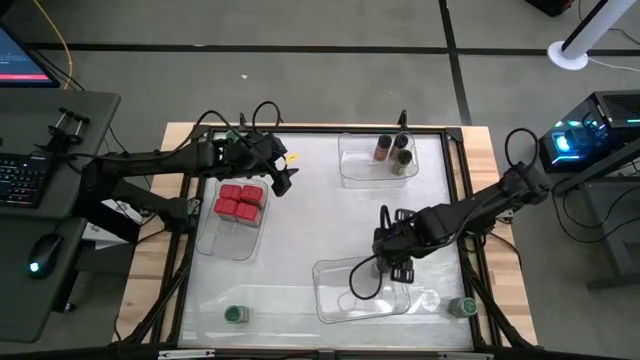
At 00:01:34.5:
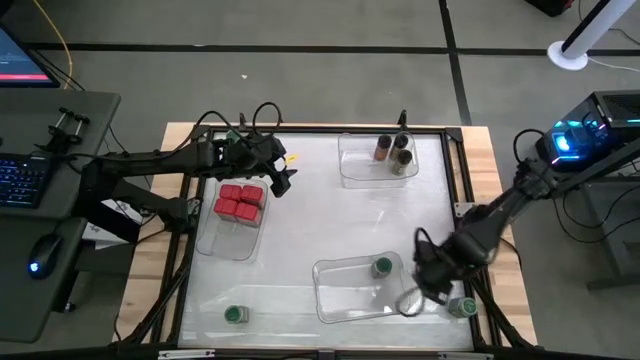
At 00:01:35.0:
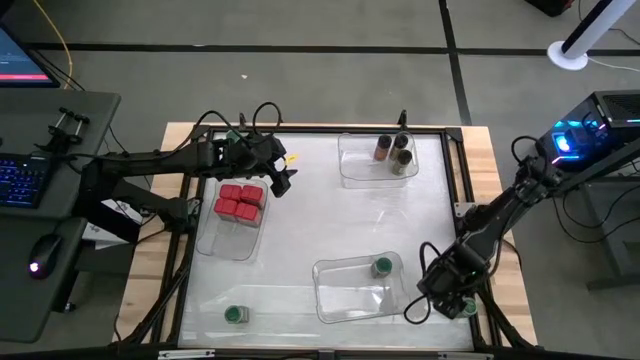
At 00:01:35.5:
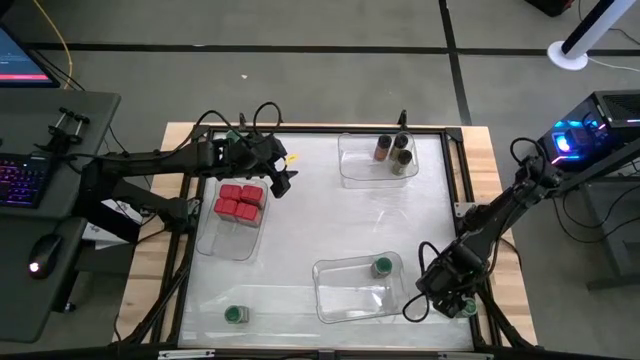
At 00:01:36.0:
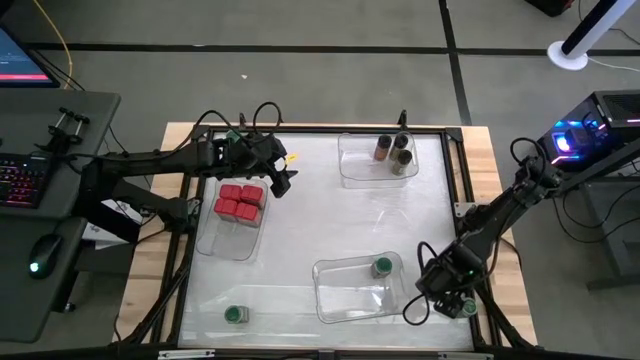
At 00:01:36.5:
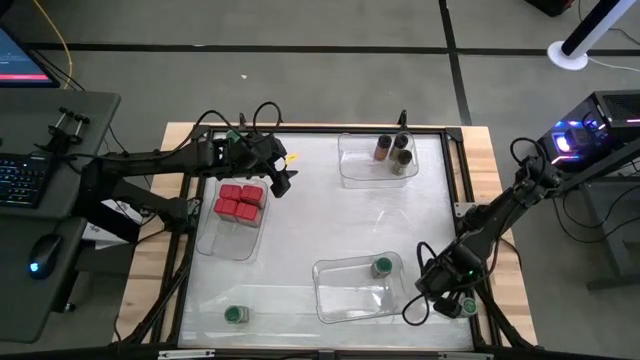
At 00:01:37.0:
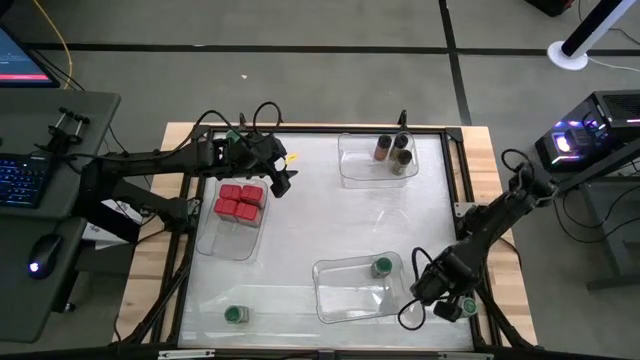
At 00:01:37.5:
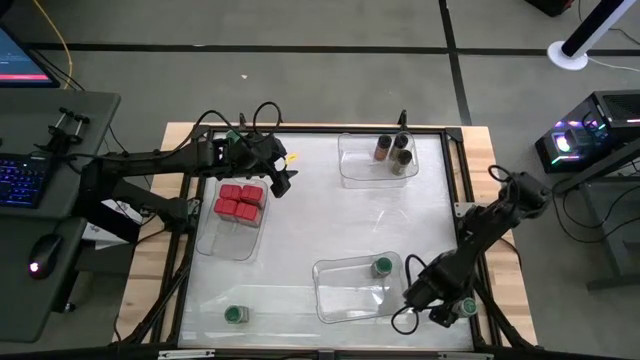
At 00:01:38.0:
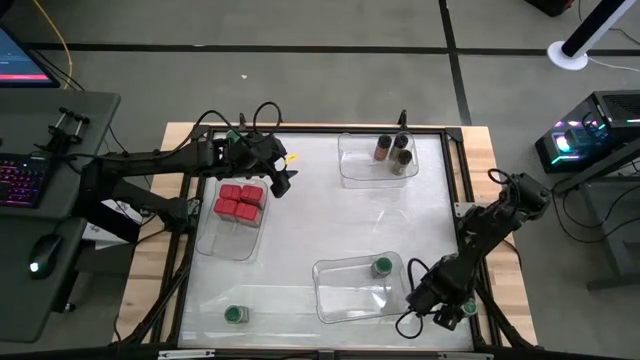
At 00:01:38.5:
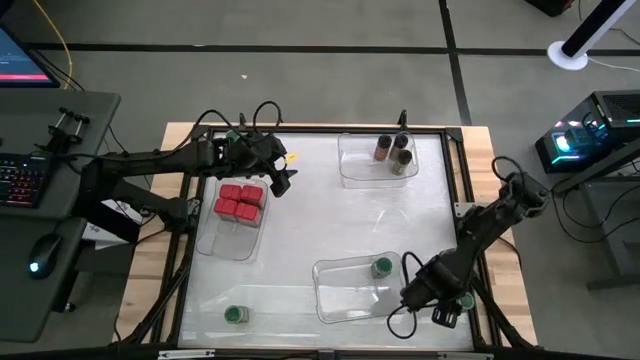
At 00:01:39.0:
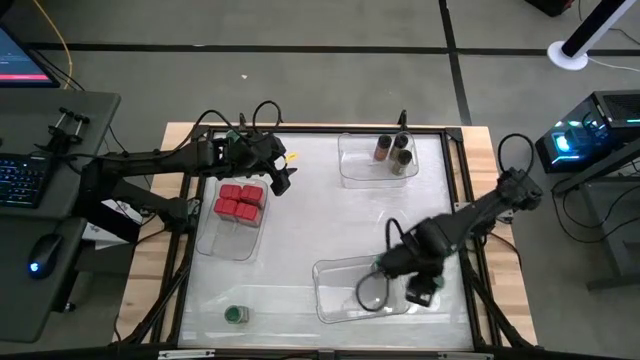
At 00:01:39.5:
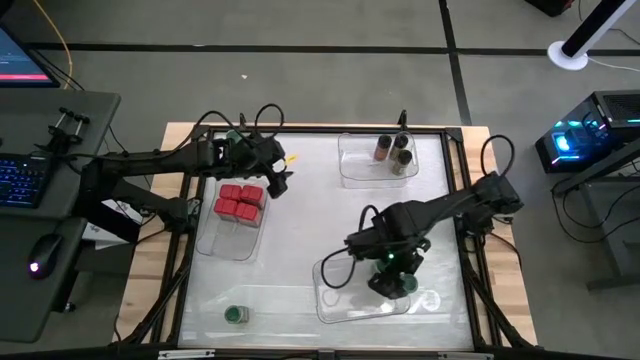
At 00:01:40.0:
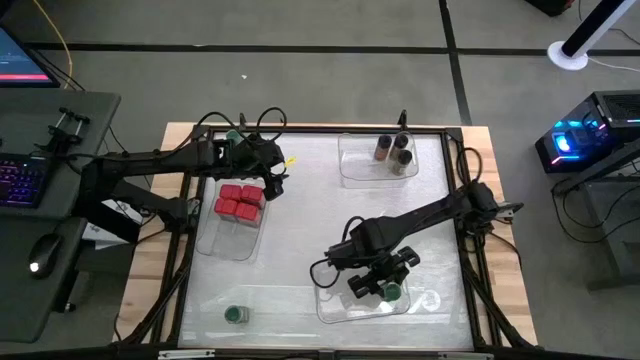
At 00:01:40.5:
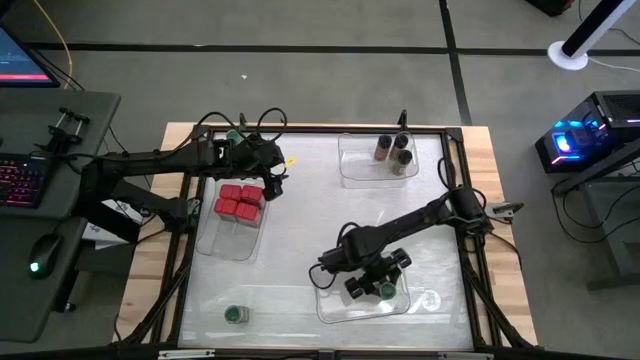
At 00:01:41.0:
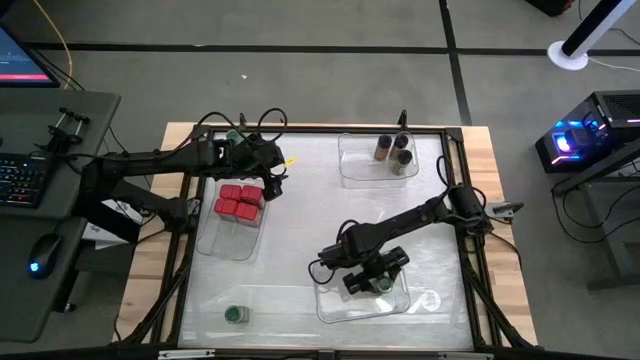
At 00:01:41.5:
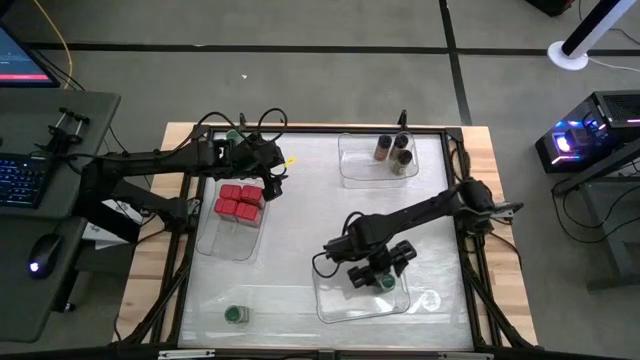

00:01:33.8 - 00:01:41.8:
Task: Sort spices by type
Put the green seasoning bottle into the bottom right transparent bin

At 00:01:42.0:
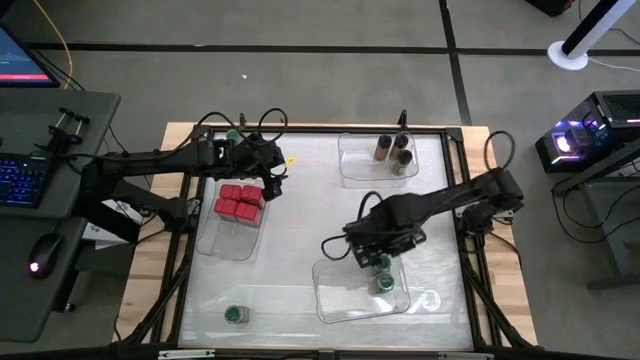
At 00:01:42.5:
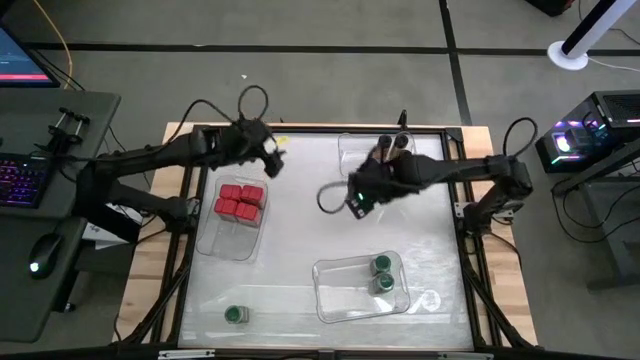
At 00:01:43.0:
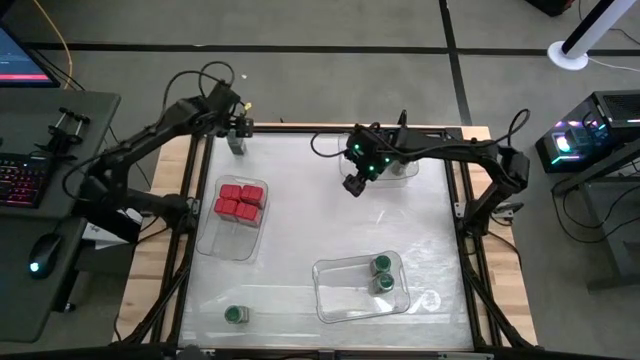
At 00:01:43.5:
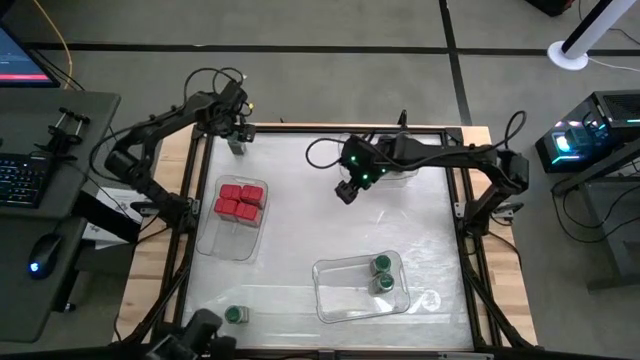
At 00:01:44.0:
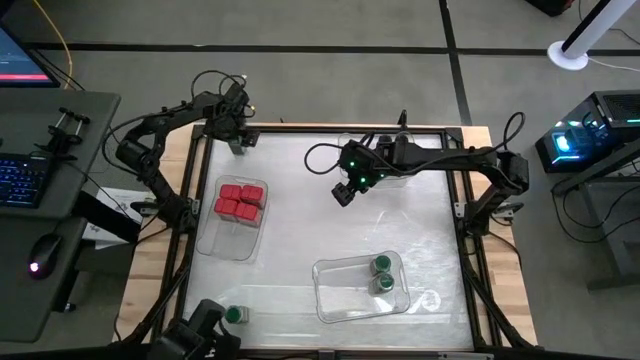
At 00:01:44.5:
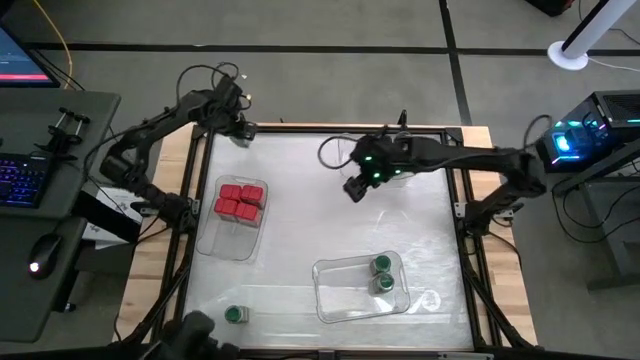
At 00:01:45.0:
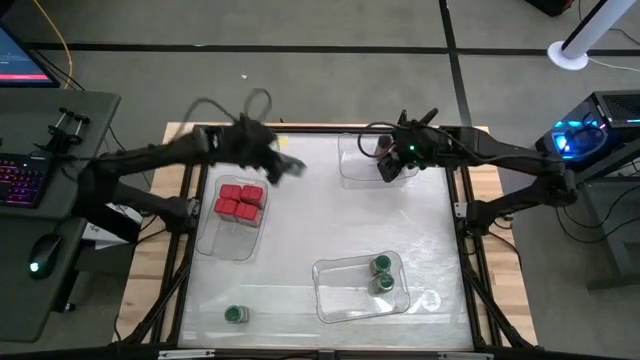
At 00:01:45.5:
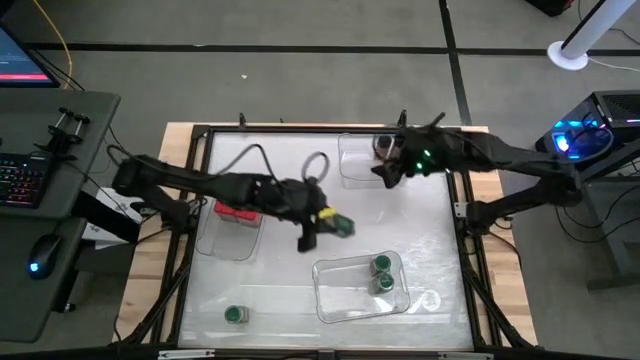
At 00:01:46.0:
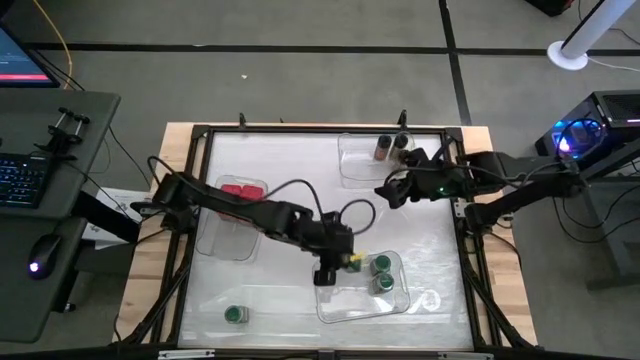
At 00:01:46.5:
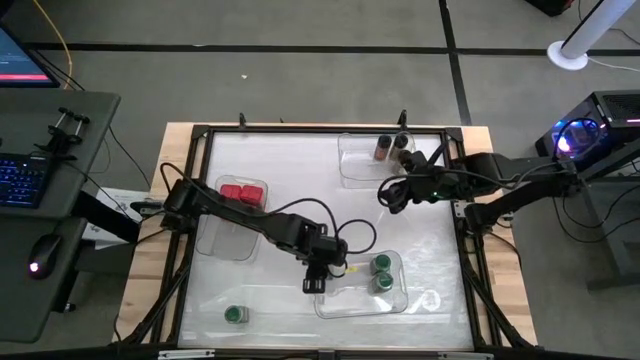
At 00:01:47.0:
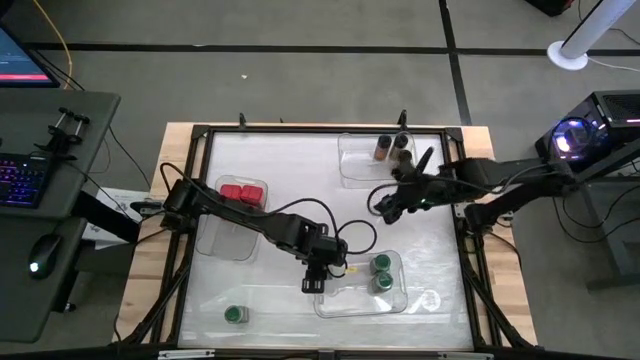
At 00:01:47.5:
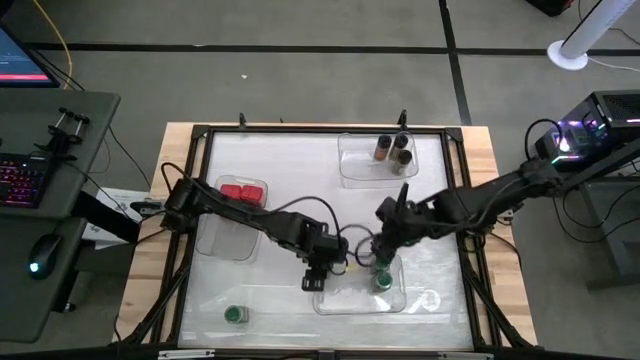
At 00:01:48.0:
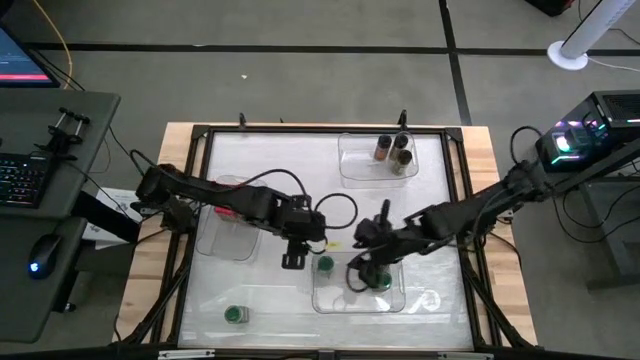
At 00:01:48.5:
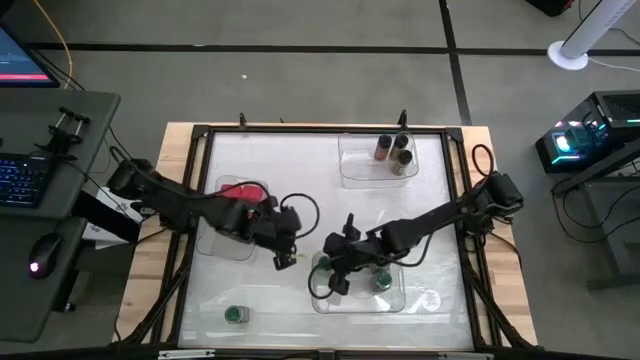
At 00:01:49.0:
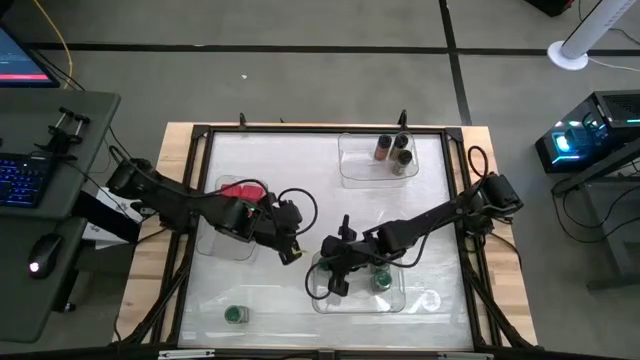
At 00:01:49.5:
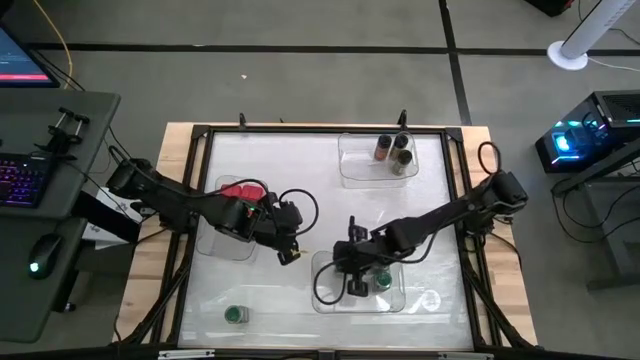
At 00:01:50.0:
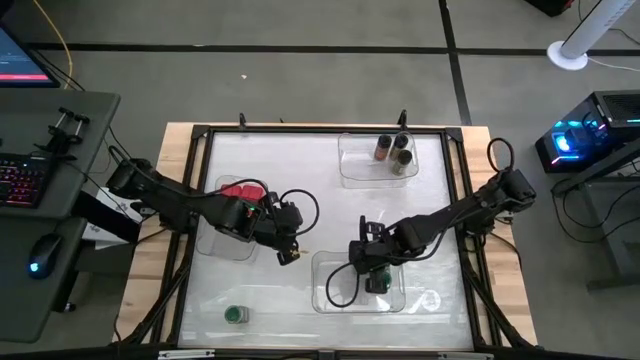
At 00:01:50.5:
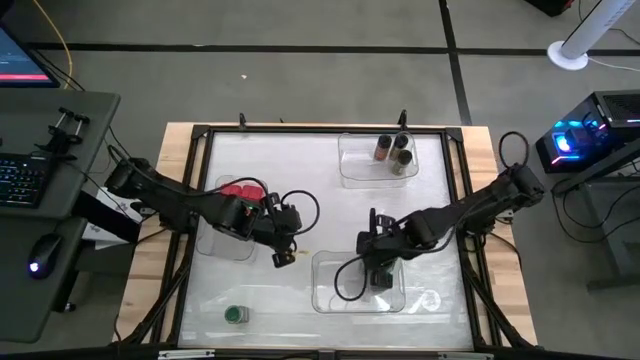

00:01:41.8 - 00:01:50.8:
Put the green seasoning bottle into the bottom right transparent bin

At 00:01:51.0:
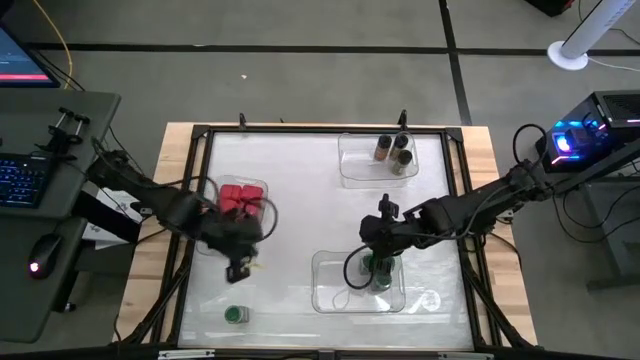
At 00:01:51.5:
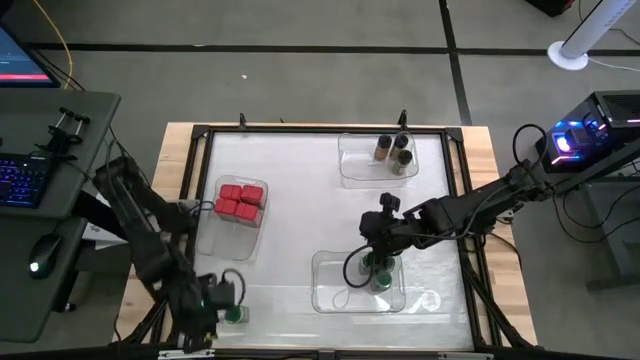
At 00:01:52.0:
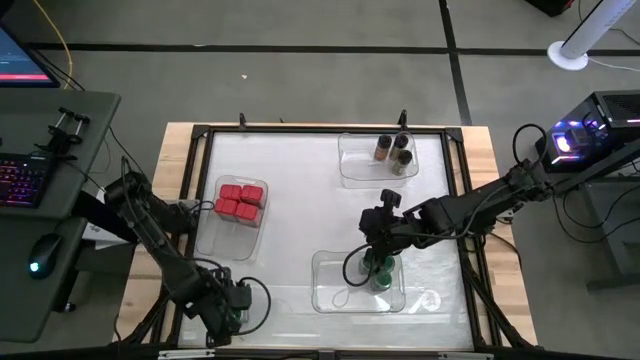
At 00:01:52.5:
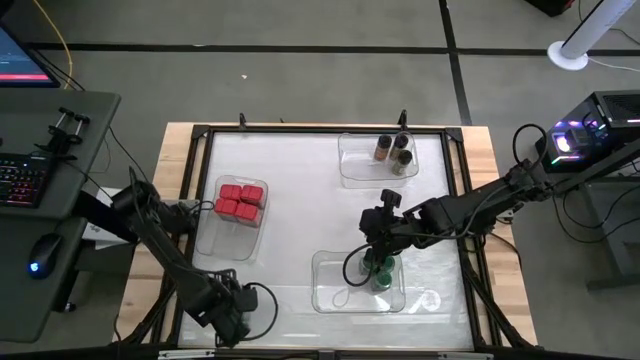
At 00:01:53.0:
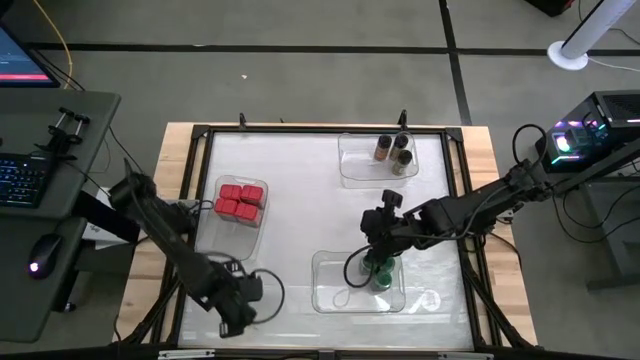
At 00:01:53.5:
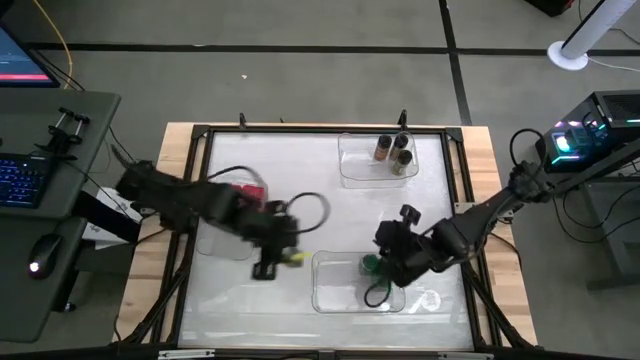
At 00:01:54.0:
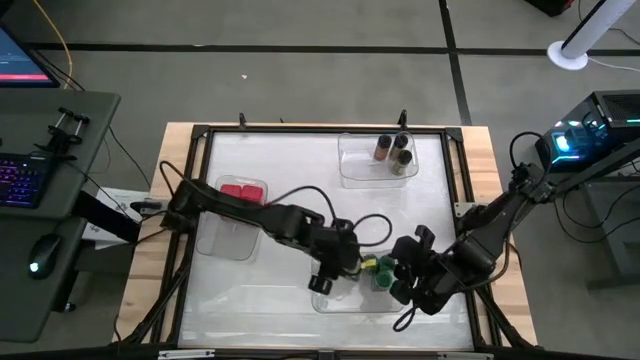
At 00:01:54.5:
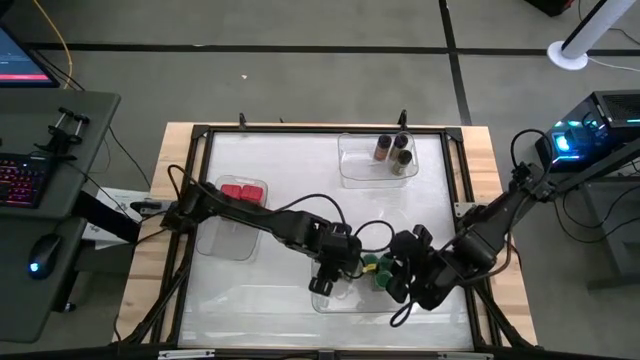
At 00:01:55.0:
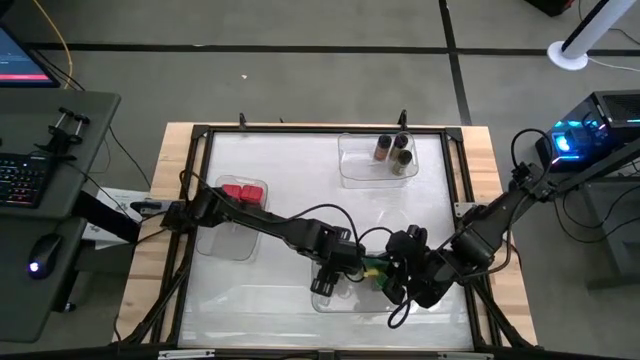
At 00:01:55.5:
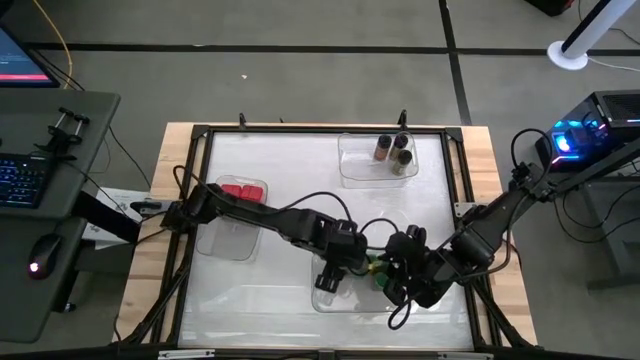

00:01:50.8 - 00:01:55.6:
Put the green seasoning bottle into the bottom right transparent bin
